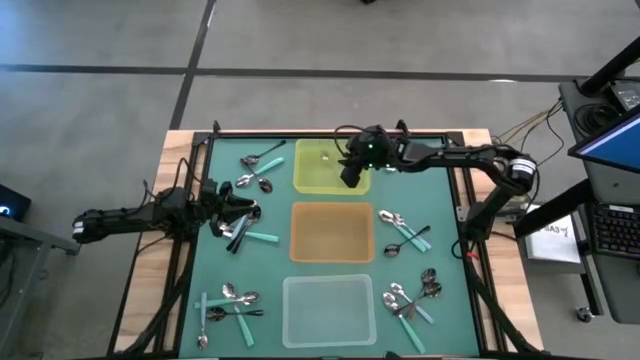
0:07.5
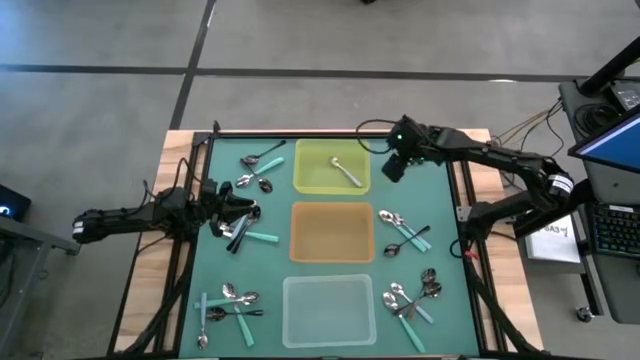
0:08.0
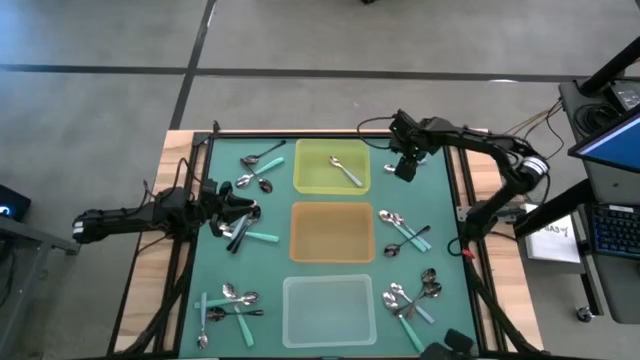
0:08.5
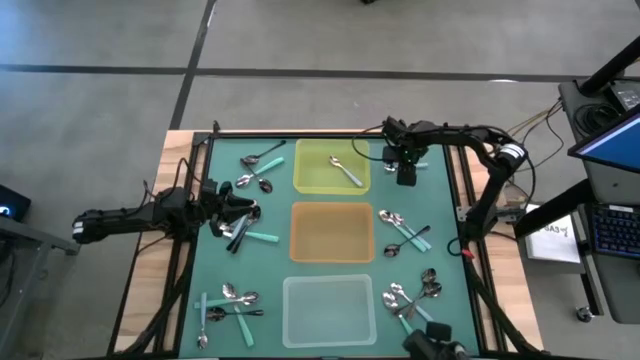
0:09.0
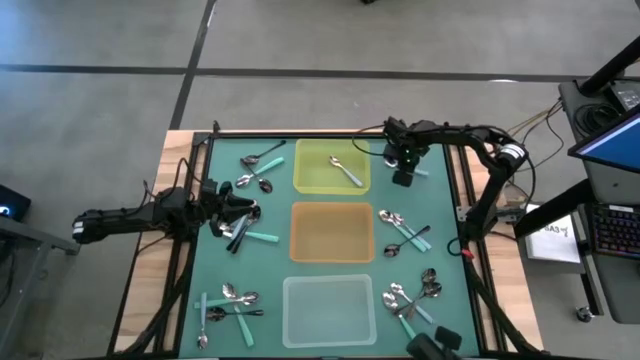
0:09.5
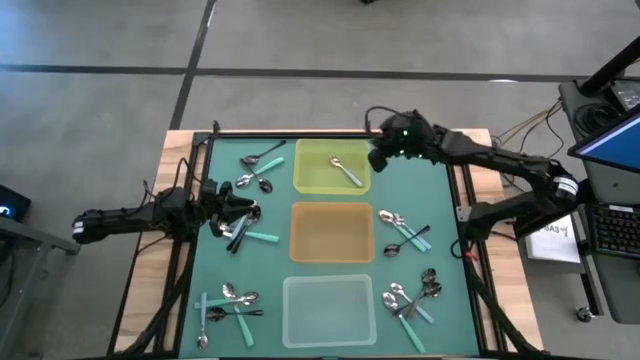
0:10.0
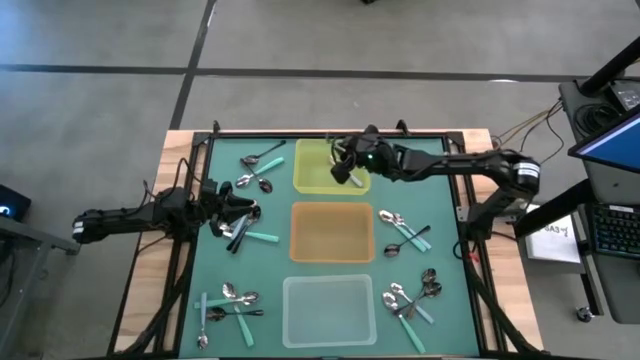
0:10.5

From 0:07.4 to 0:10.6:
Task: Sort silverware by color (type)
Put the blue spoon into the yellow bin

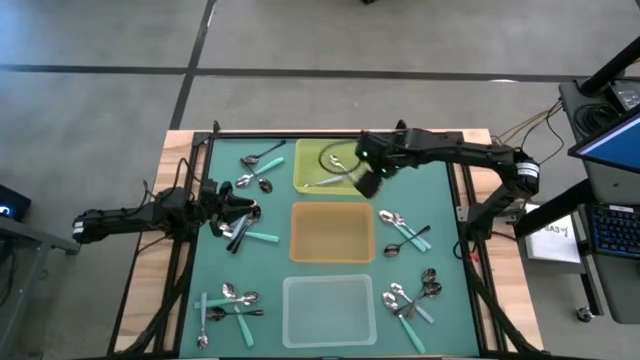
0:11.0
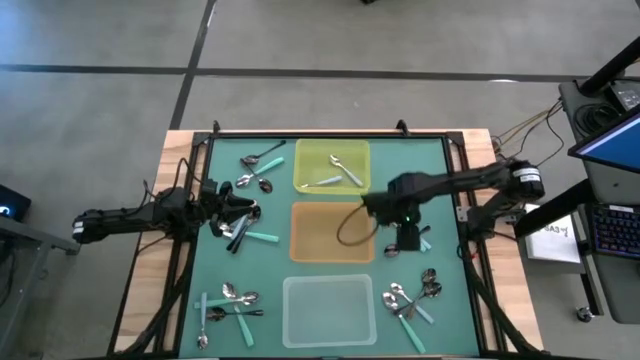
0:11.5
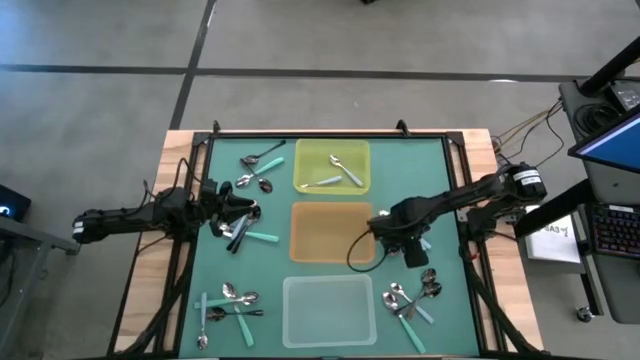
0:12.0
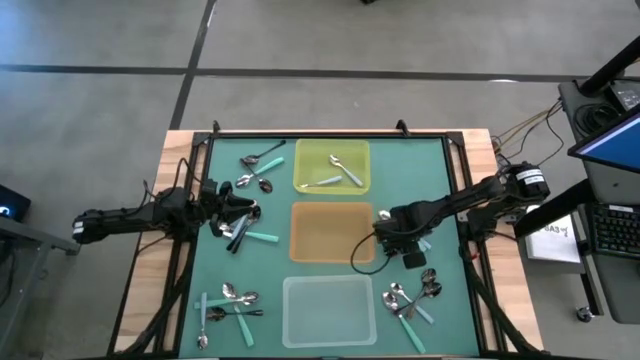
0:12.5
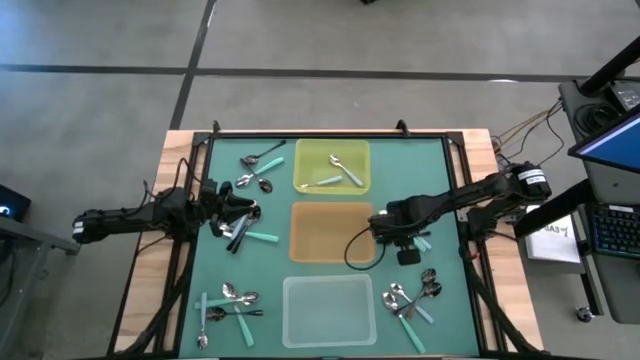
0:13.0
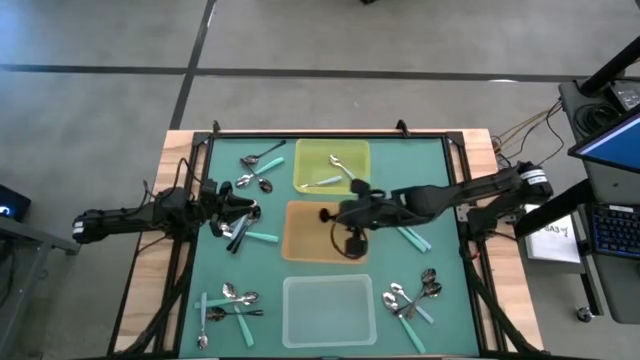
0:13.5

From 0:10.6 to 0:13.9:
Put the black spoon into the orange bin

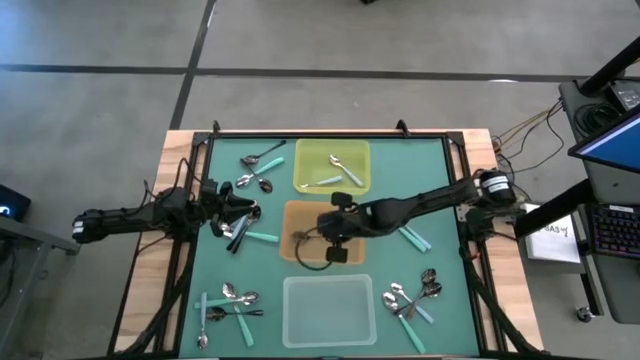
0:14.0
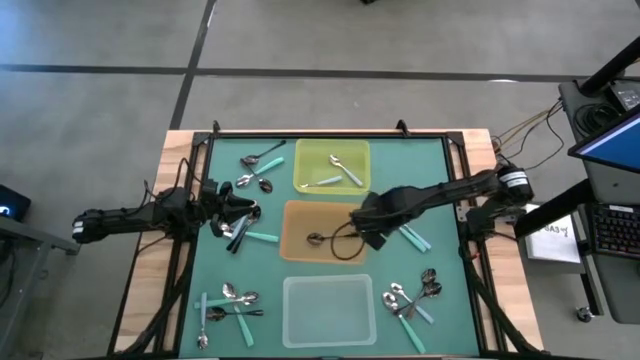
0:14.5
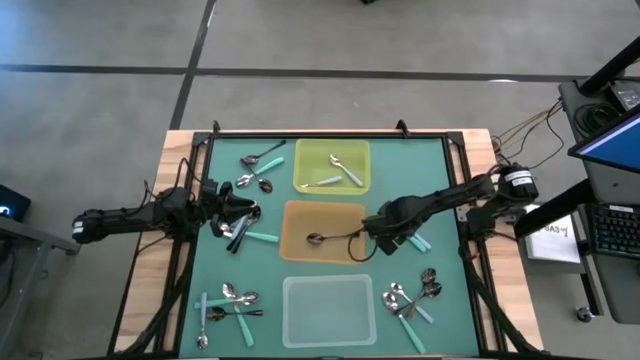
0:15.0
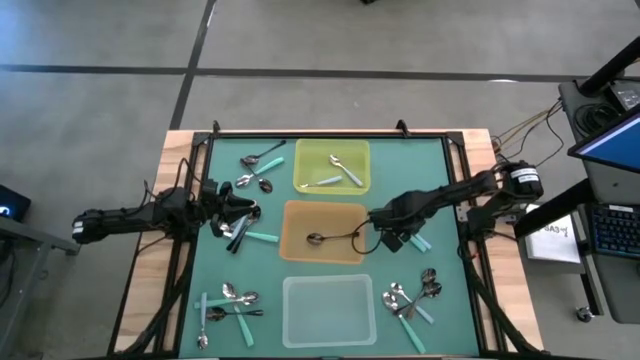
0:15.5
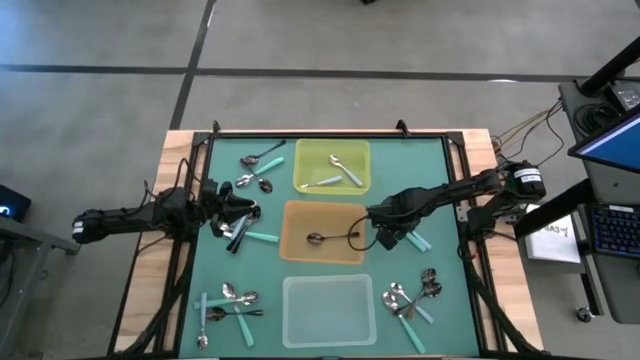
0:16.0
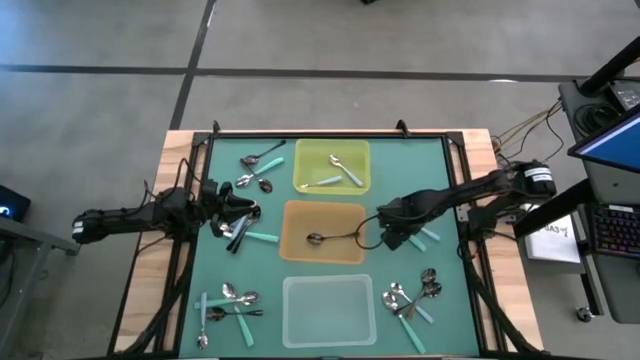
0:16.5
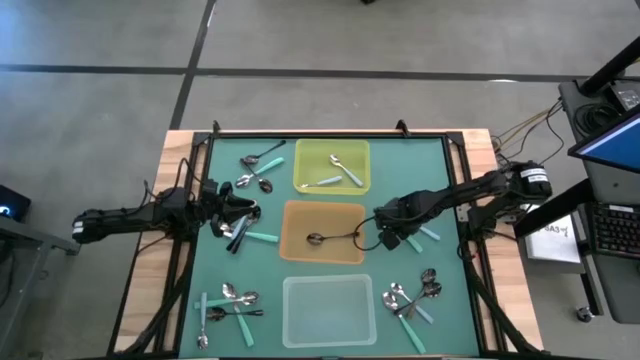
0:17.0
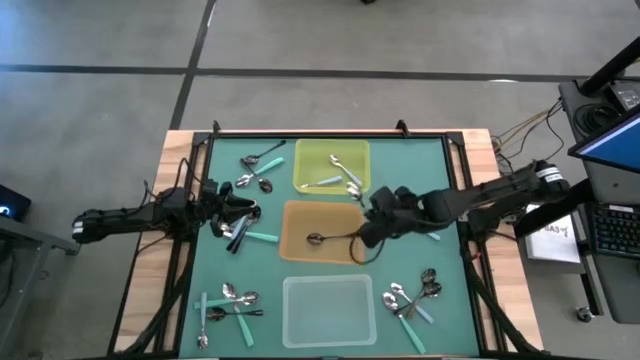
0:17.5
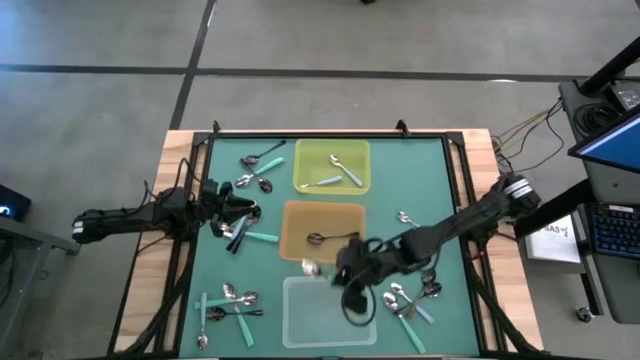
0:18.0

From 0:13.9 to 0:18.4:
Put the green spoon into the transparent bin

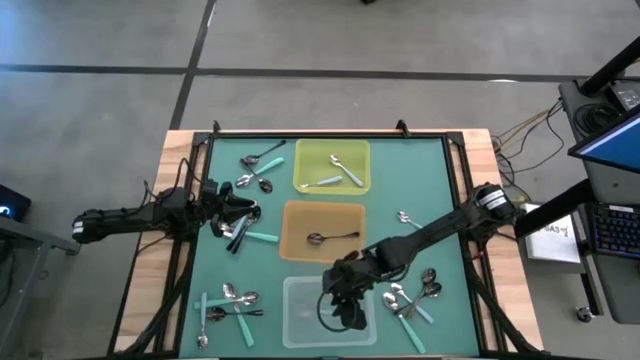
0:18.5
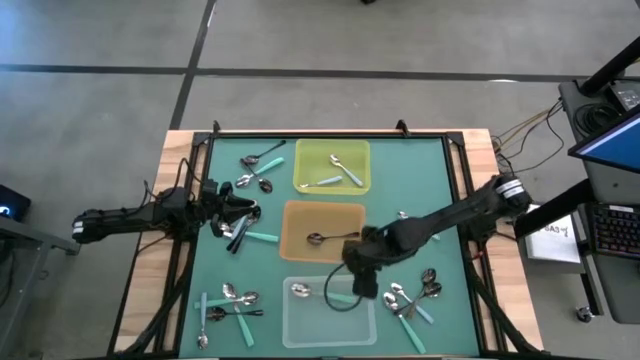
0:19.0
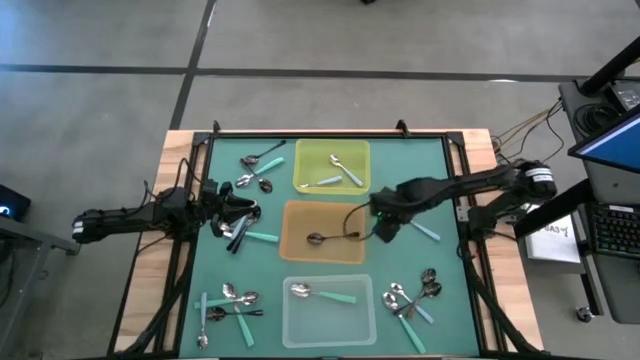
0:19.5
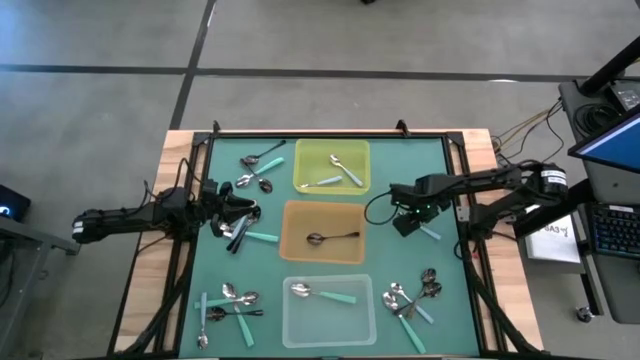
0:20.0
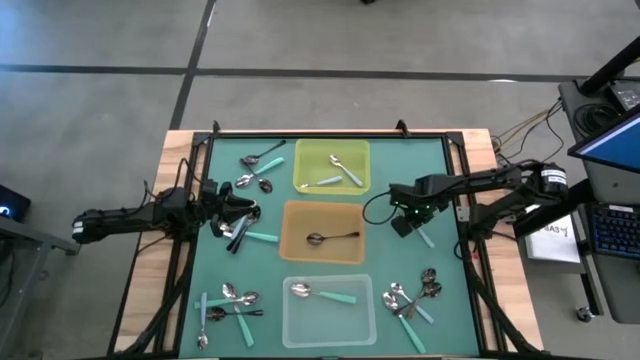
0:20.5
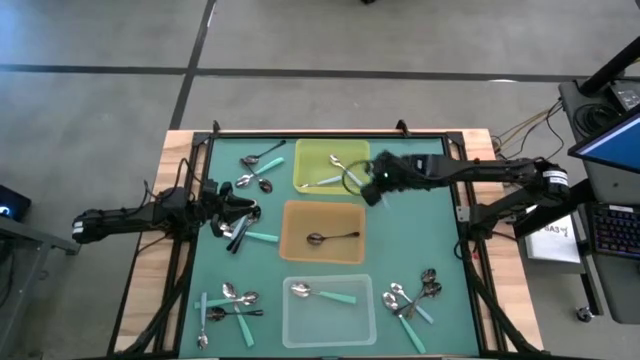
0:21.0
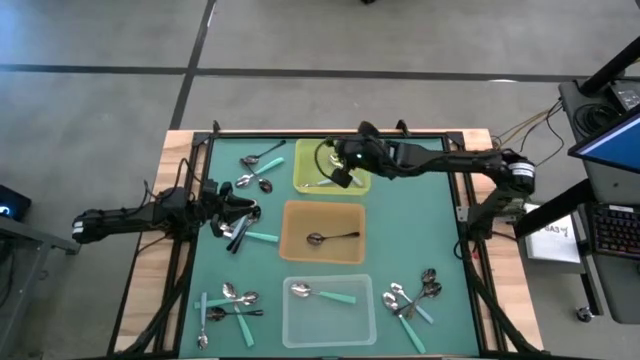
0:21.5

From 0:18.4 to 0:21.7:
Put the blue spoon into the yellow bin

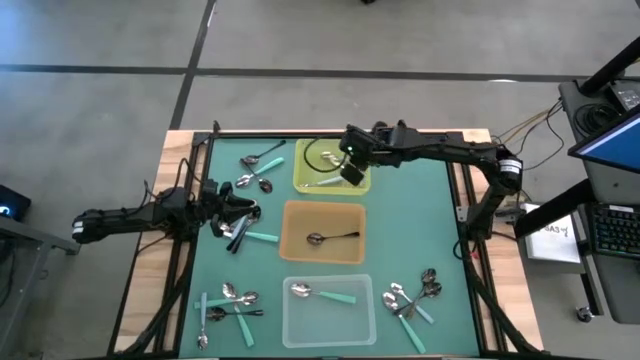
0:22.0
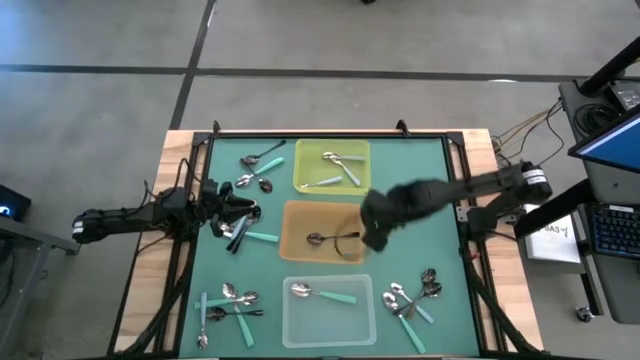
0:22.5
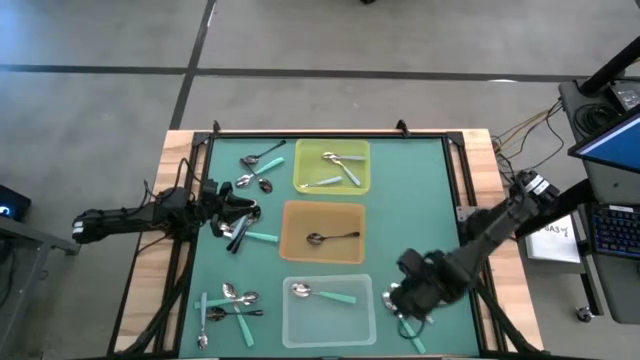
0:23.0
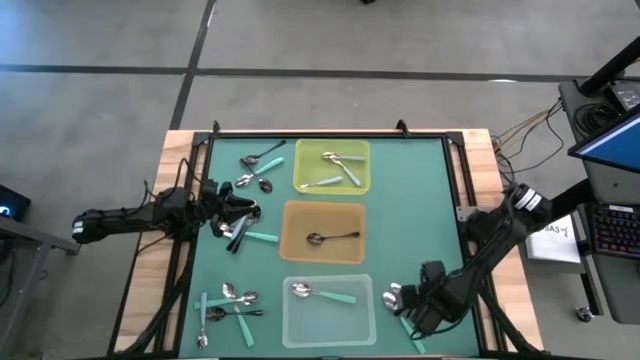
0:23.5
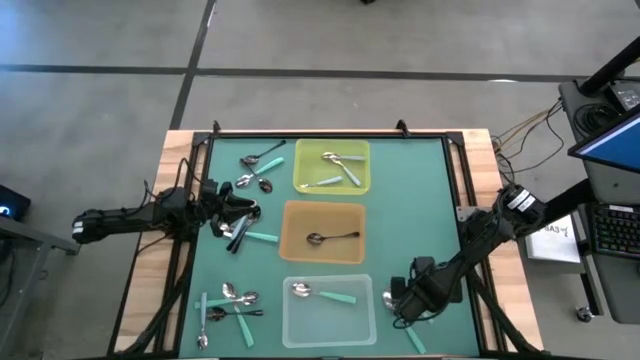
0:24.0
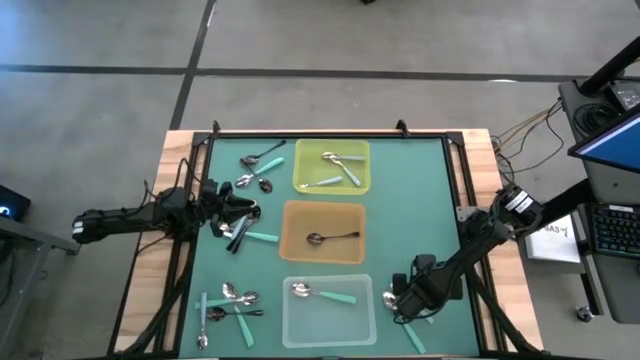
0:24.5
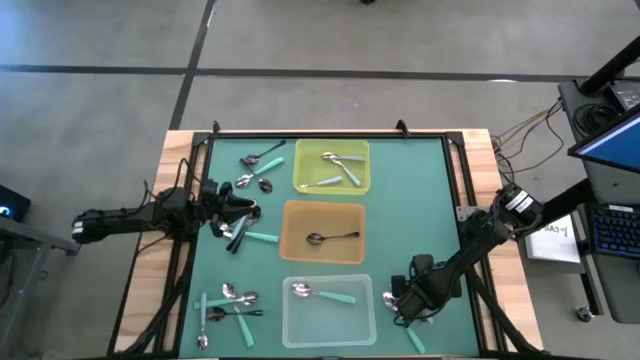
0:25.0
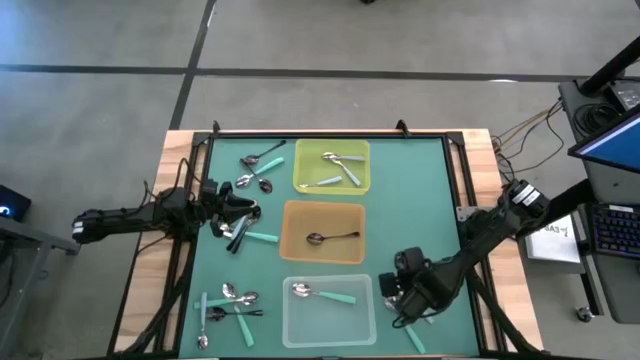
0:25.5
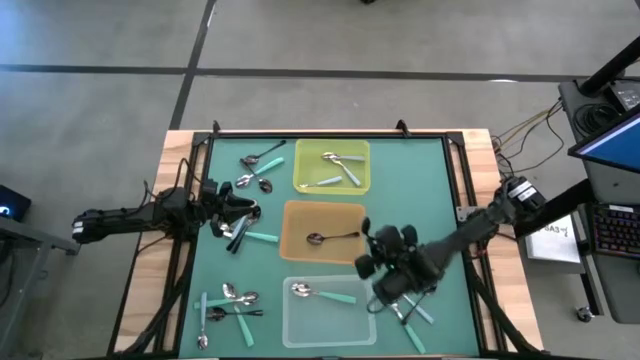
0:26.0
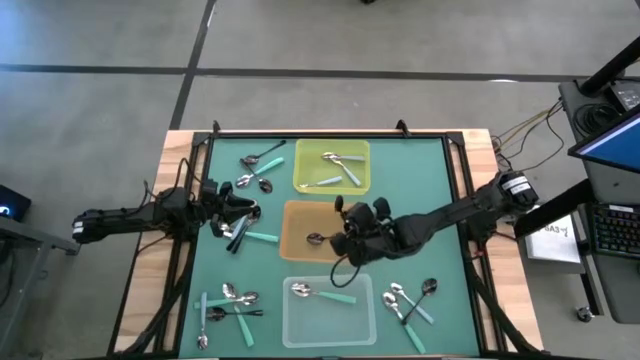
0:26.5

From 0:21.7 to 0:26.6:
Put the black spoon into the orange bin

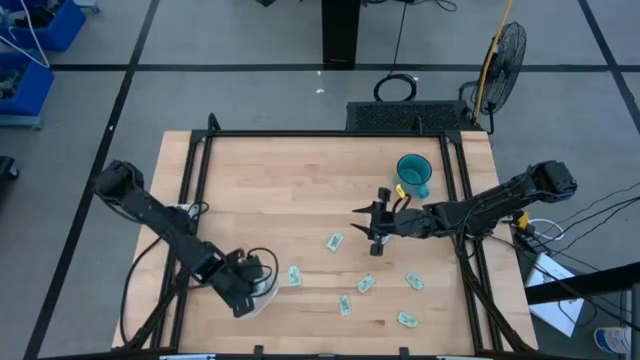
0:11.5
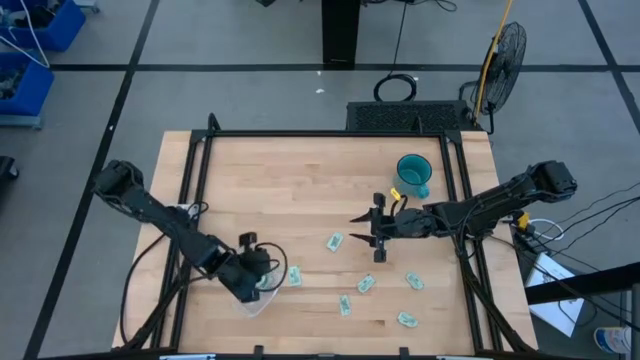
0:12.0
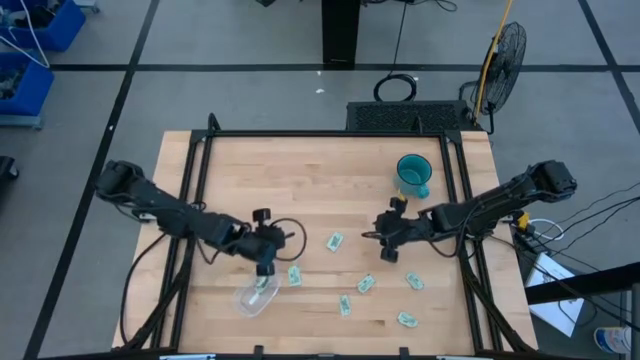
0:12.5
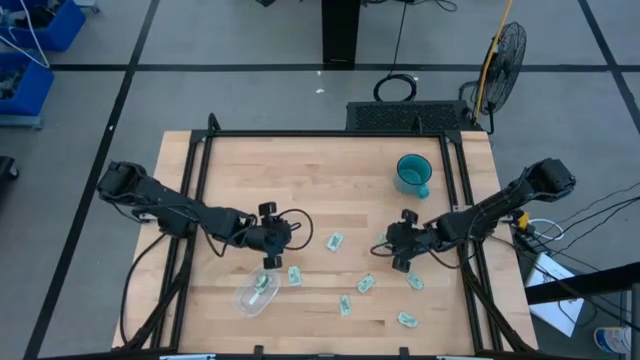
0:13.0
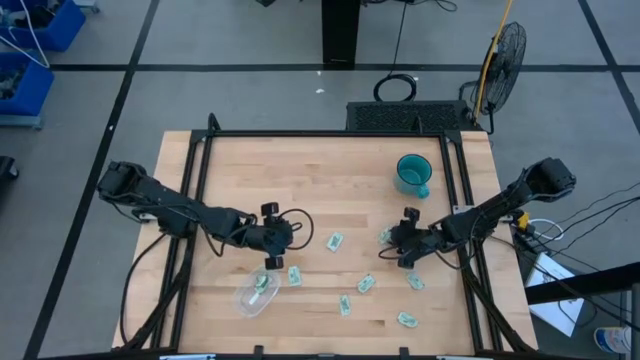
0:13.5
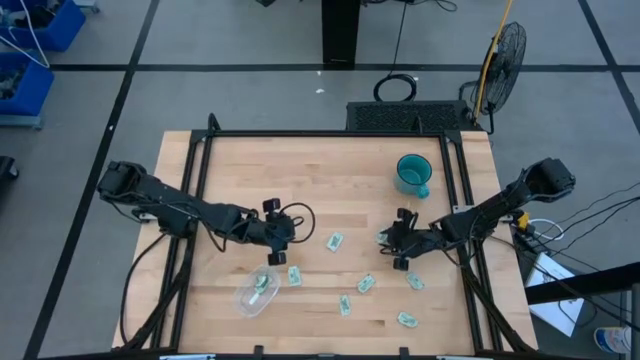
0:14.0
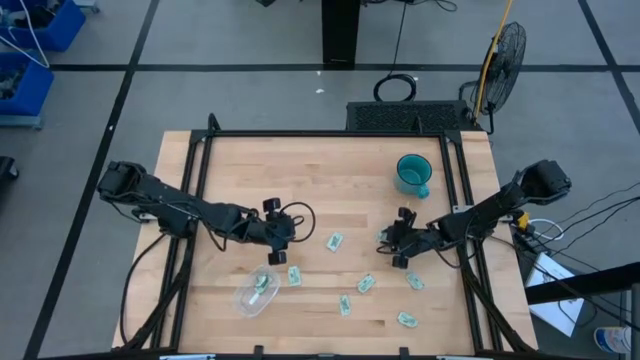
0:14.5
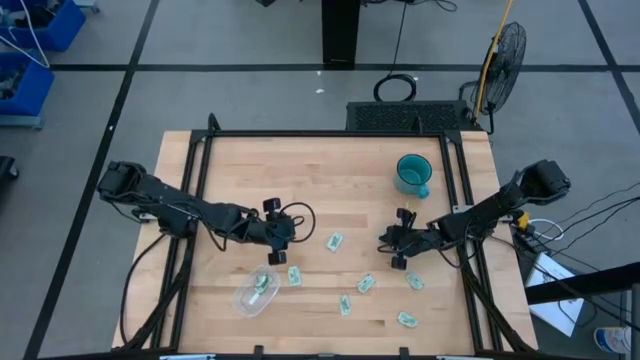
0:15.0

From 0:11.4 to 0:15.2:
Task: Pick and place Stevia / Truvia into bins
Put the white stevia packet into the transparent bin
